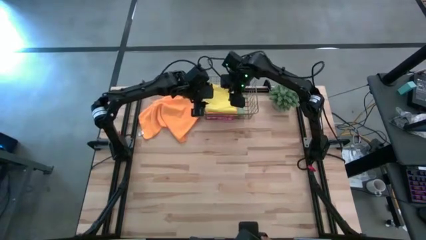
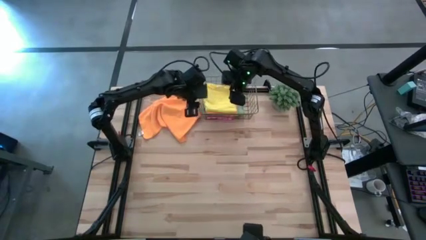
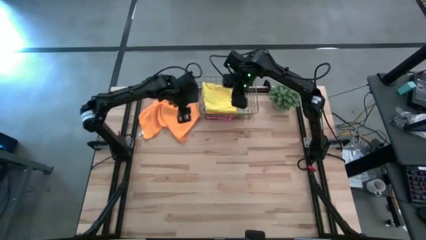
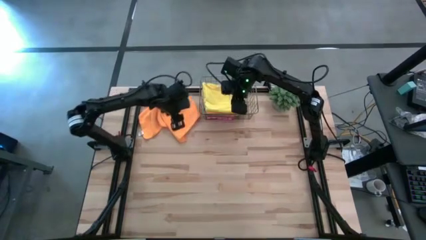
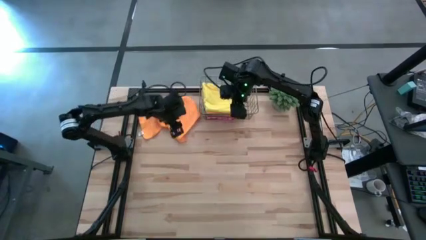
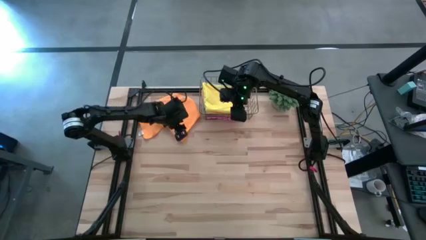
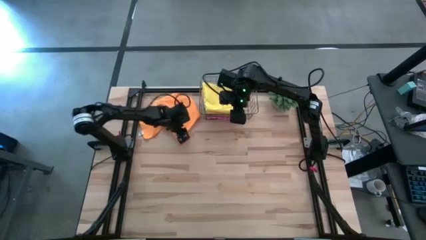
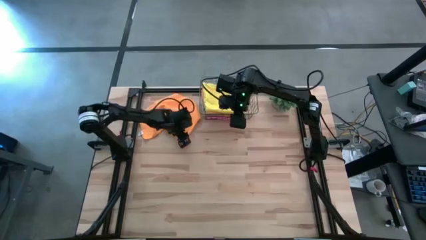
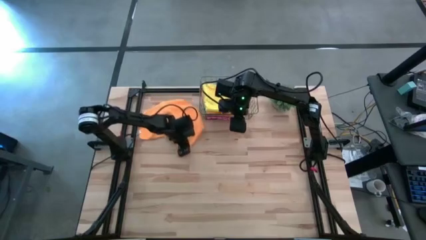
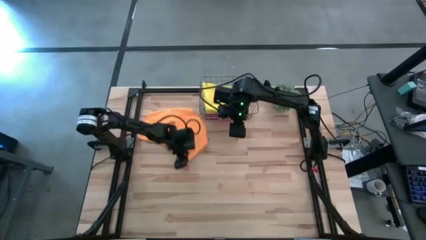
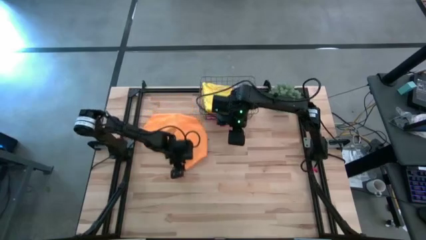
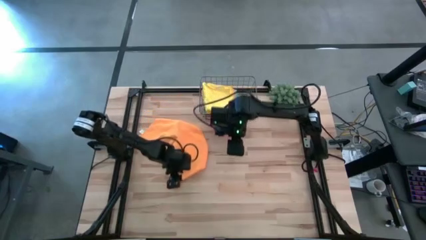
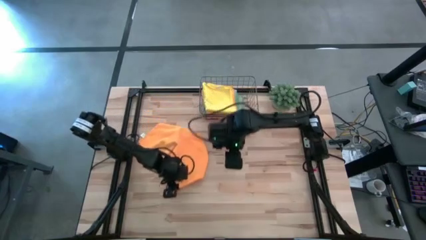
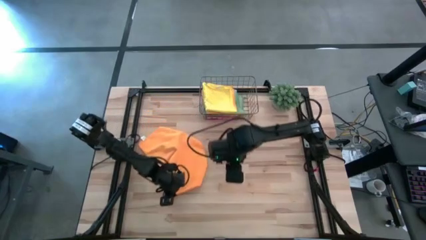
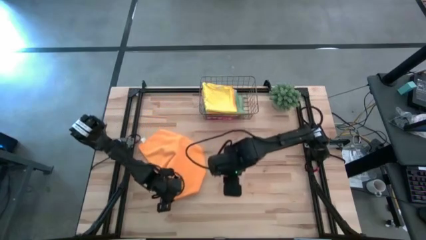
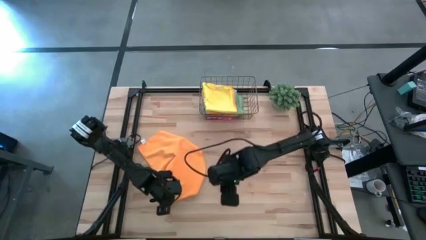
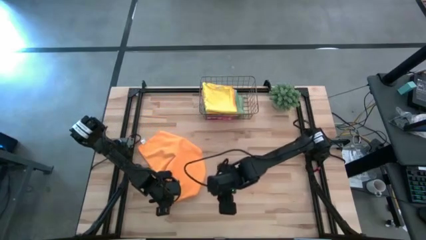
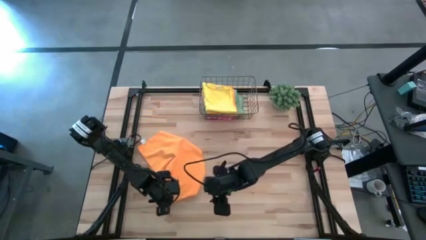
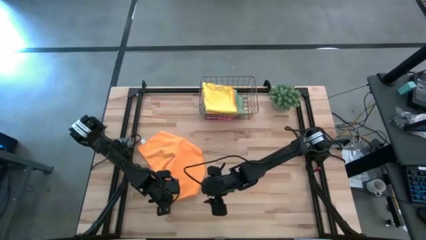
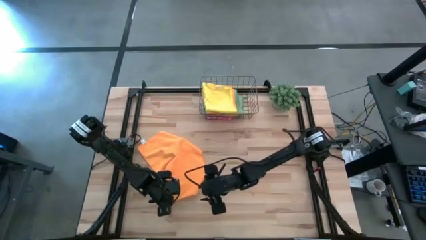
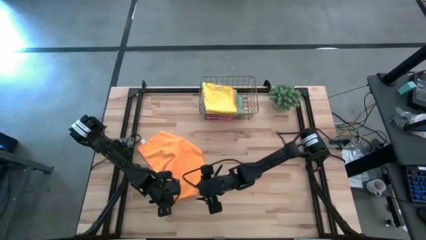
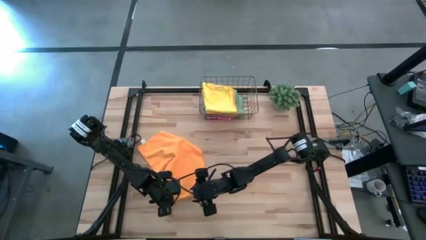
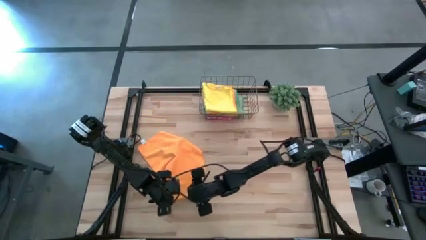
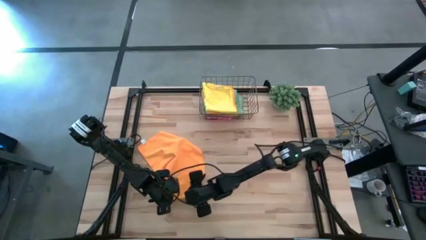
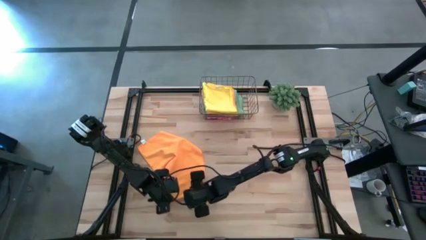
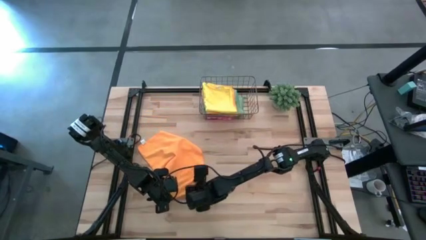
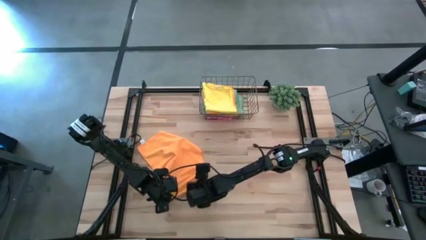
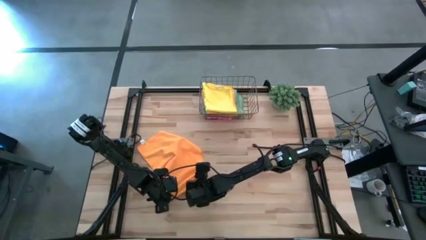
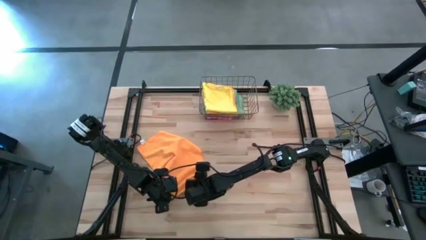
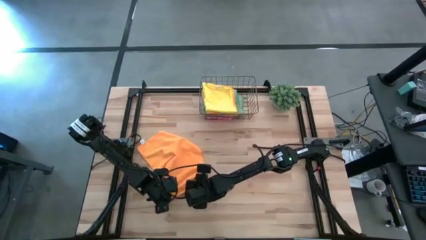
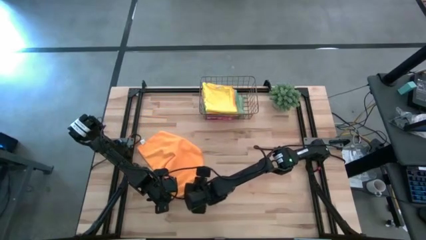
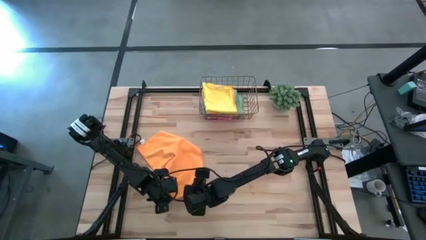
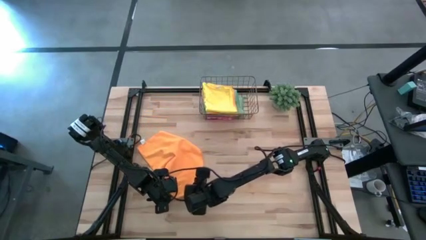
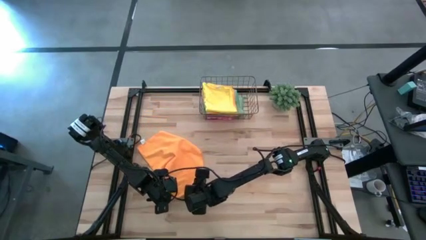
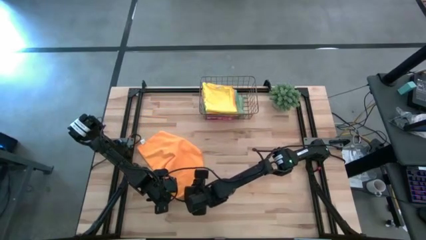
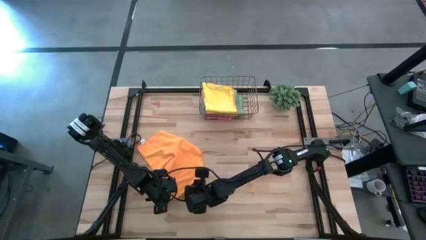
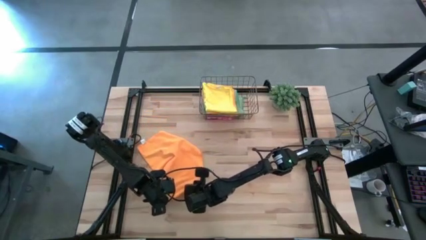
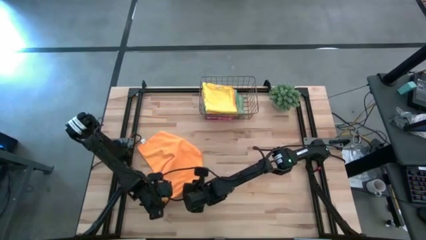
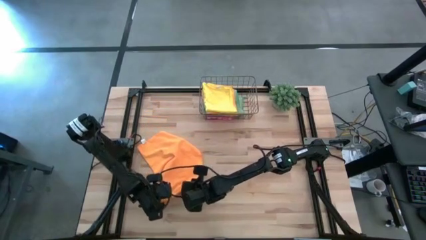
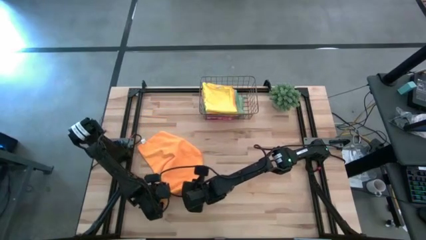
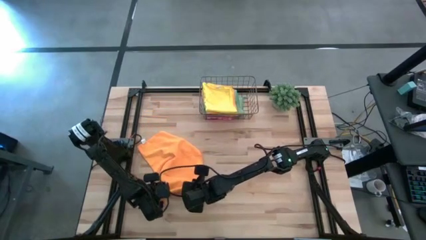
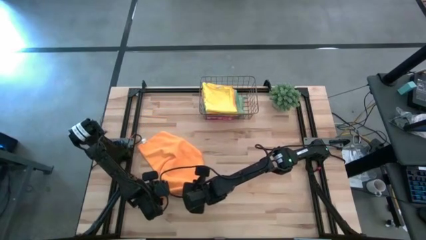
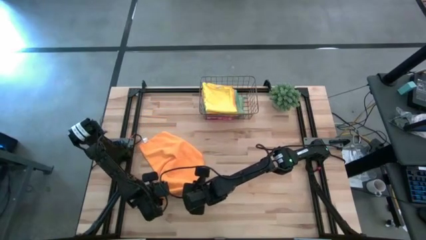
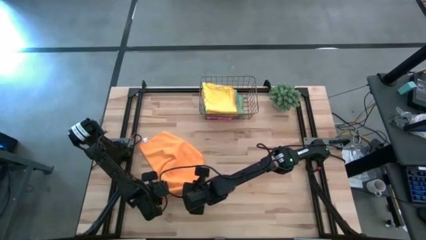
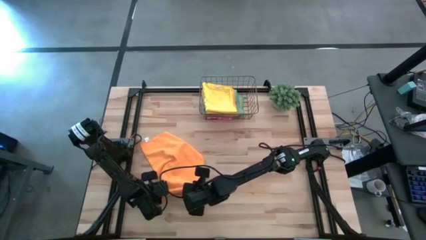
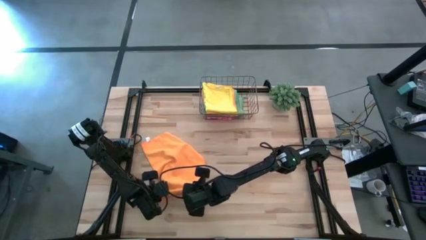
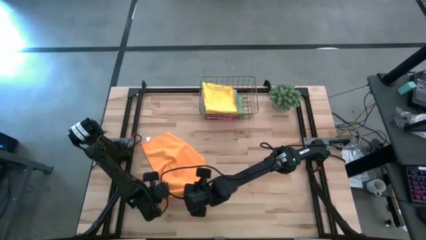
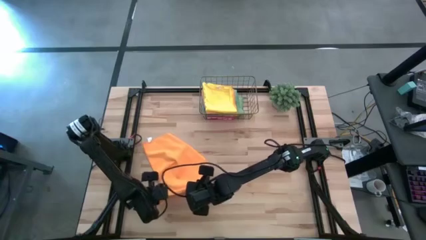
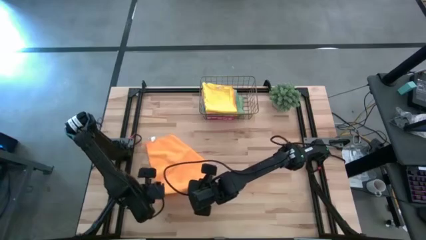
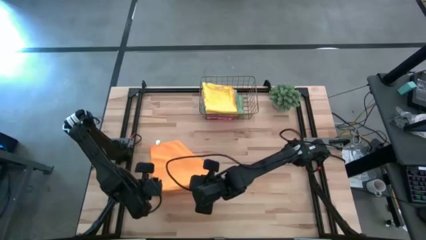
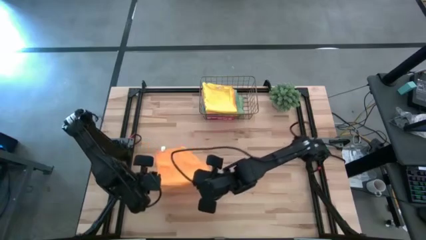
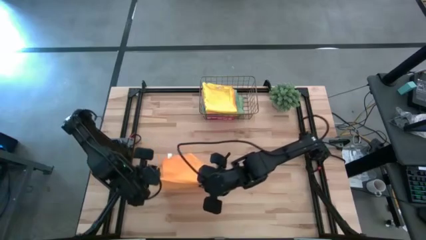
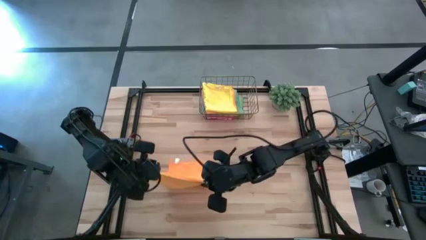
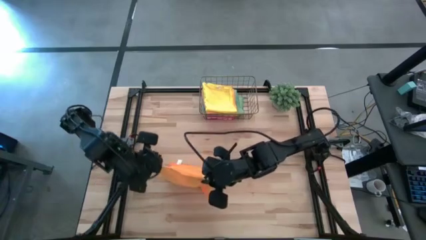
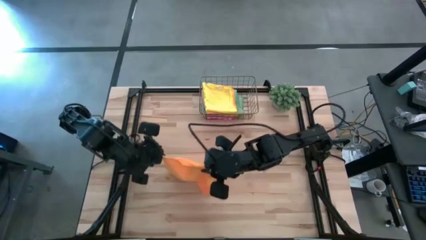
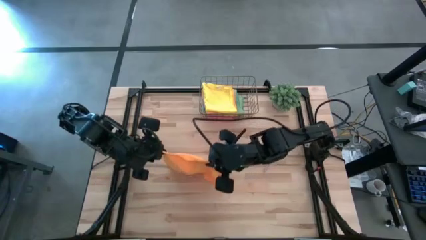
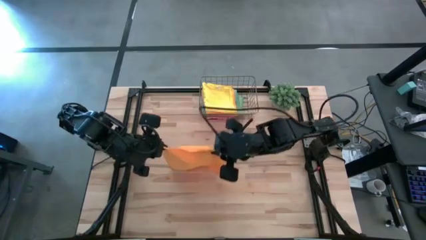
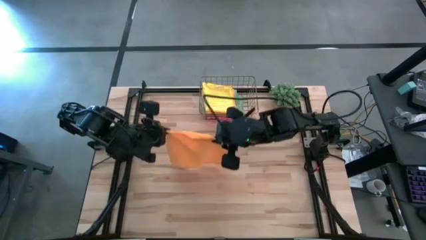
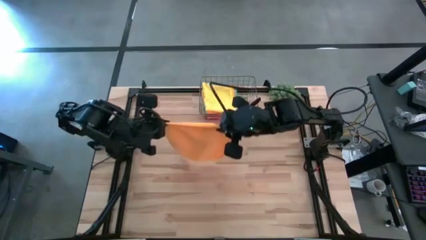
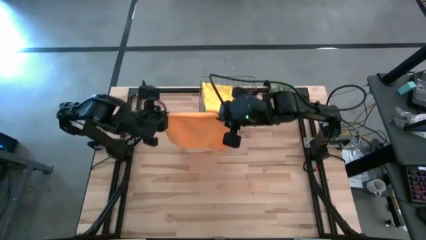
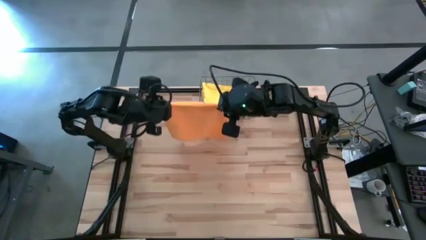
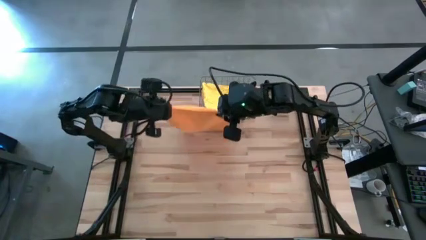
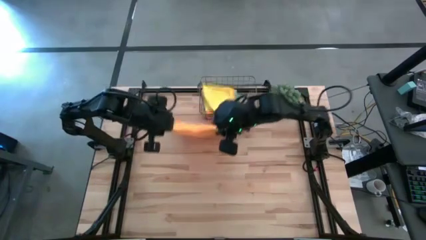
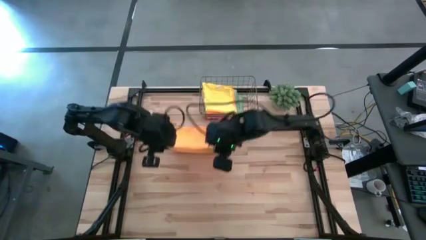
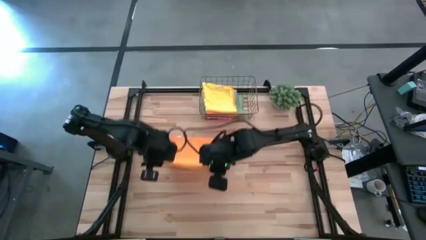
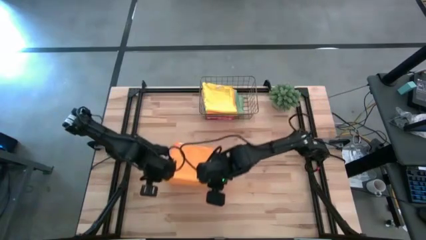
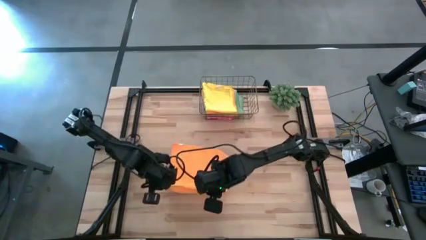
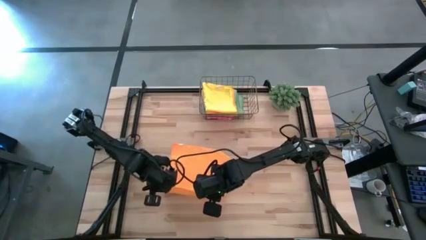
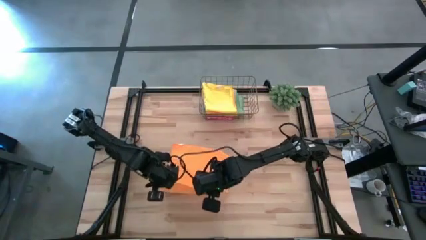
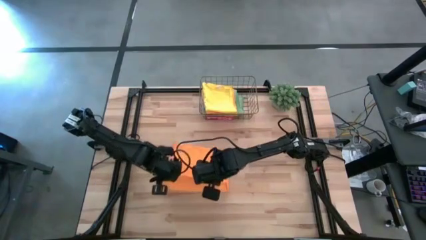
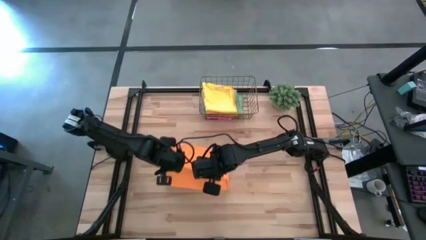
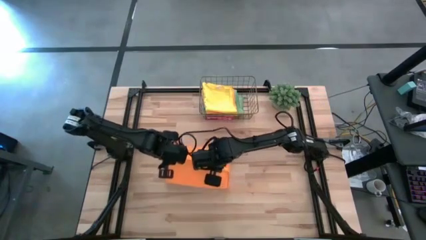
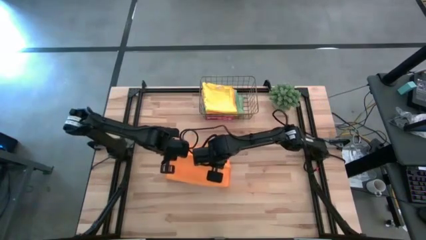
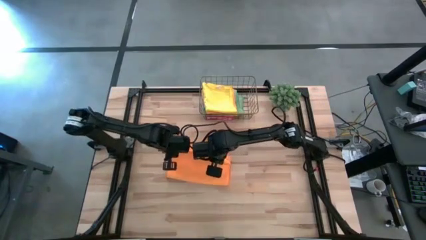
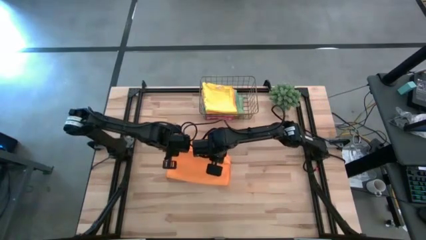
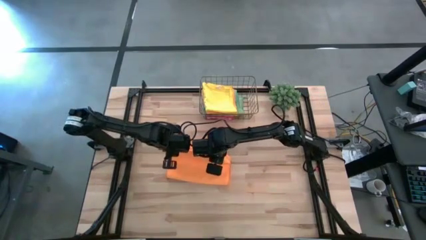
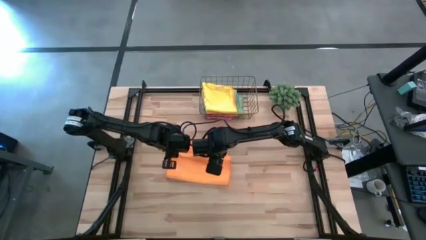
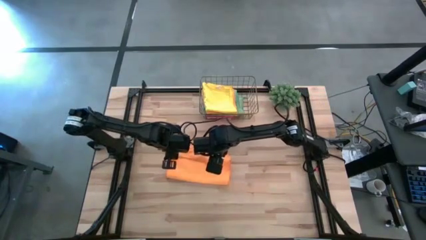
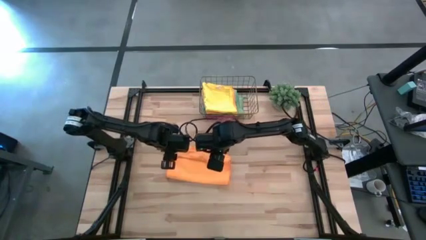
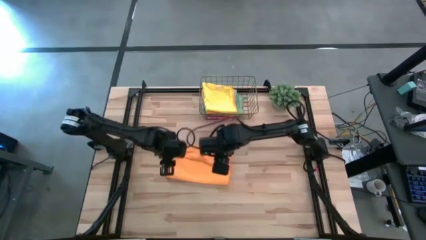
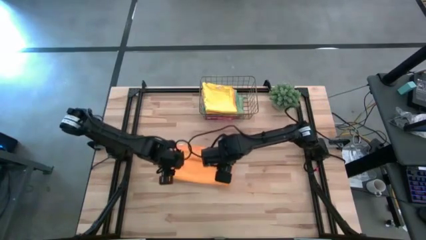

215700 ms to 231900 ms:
Task: Fold microfiber towels
Fold the orange microfiber cloth

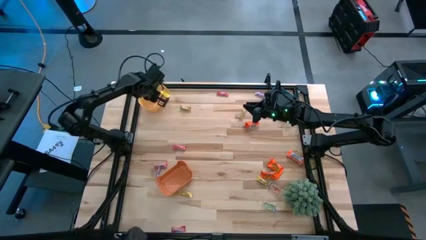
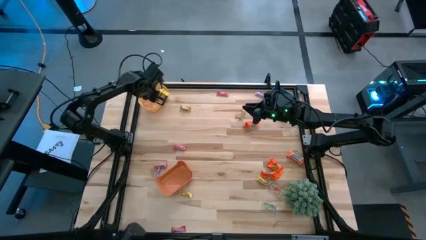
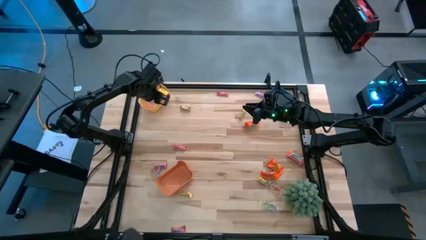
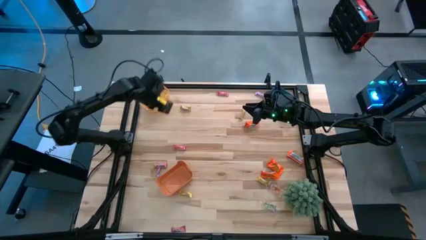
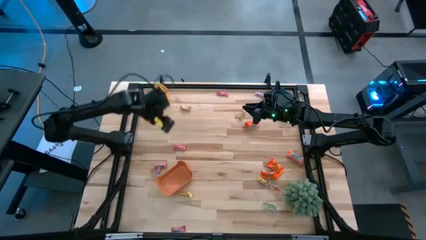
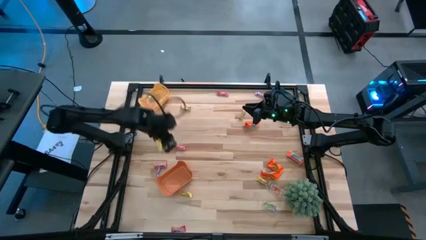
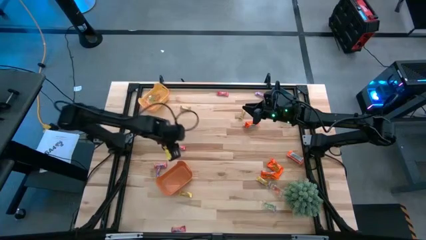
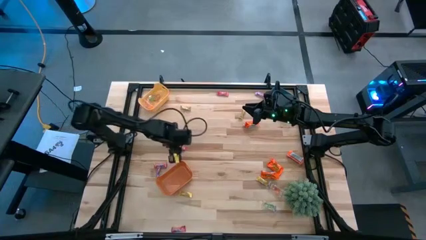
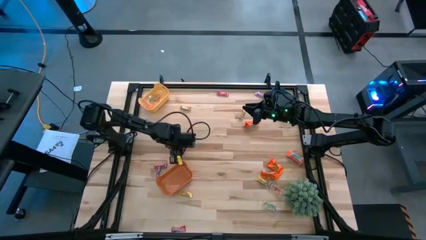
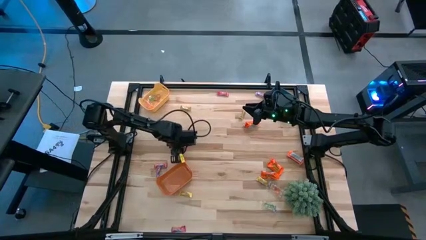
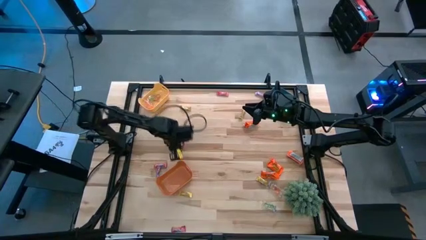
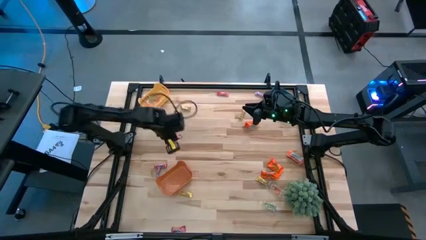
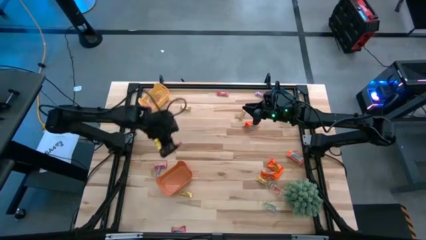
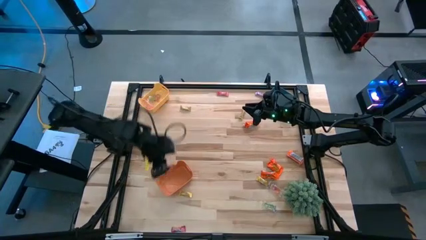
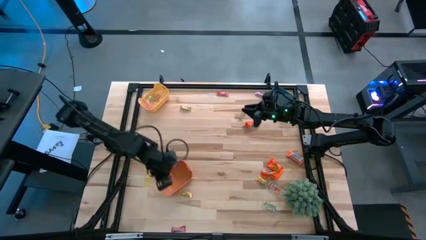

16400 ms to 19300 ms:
Task: Sort candy
Put the middle right red candy into the orange bin
